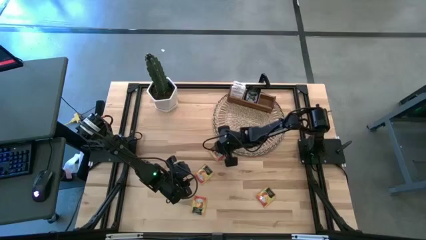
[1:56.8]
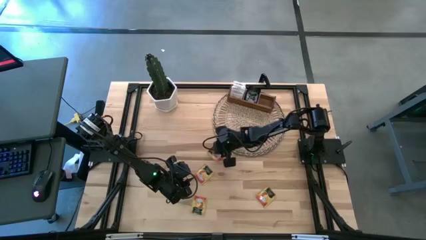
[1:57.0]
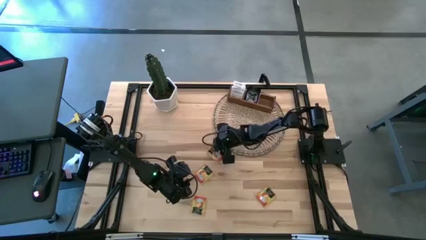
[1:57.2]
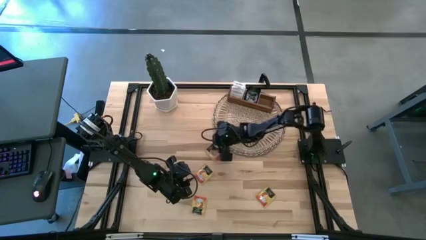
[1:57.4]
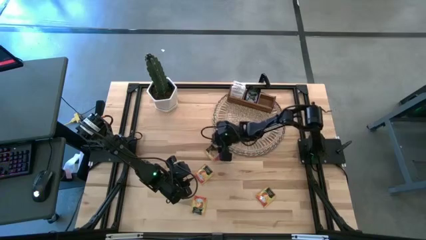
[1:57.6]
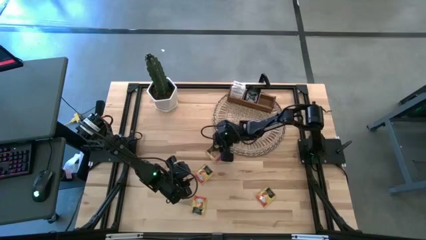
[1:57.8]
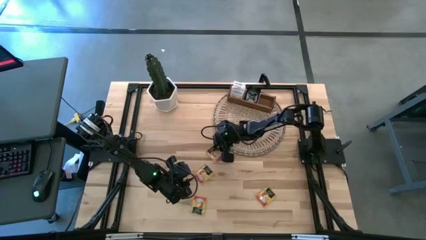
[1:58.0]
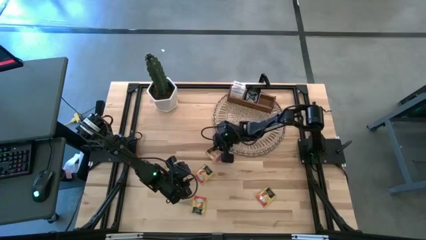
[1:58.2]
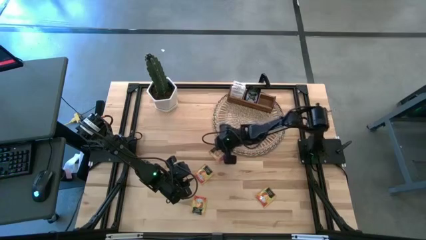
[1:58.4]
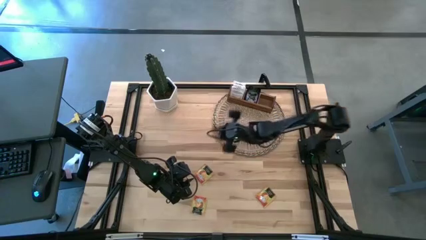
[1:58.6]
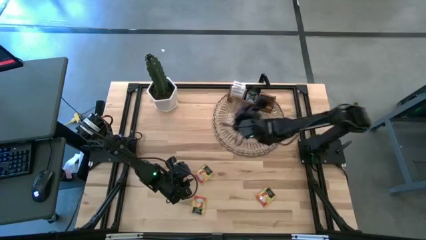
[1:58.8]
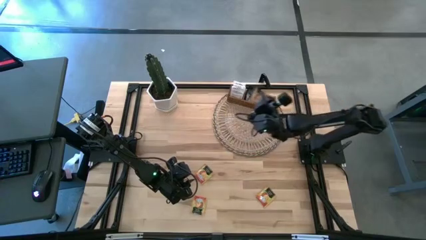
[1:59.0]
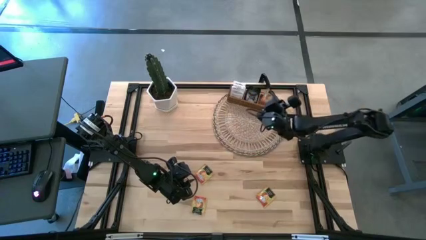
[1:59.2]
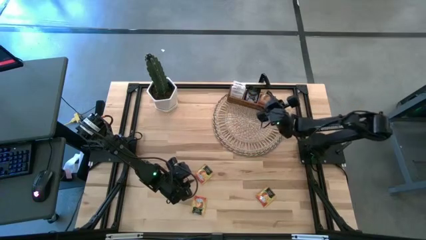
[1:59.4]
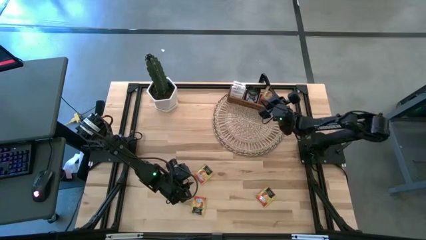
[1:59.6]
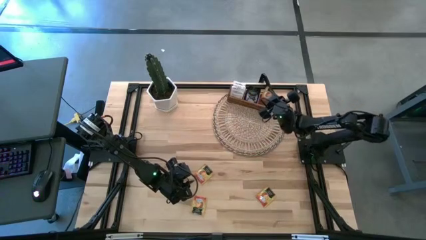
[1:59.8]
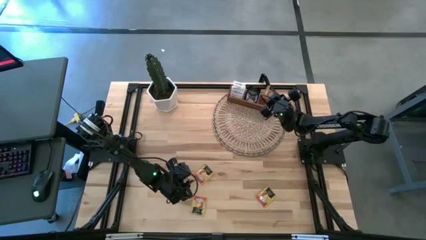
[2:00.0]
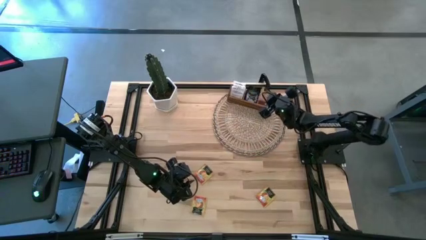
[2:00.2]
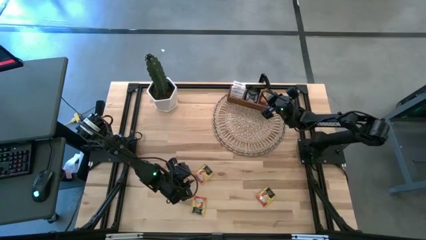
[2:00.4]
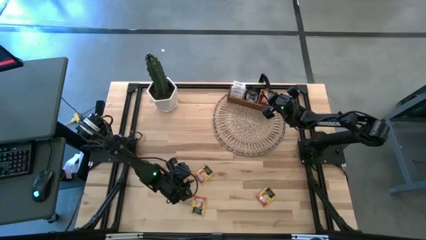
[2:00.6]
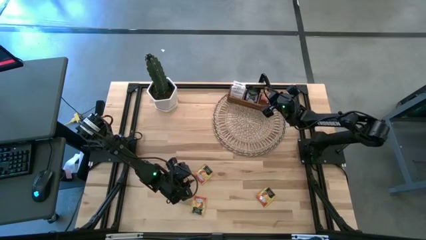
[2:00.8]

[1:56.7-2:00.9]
Task: Pick & Place Tea
Put the yellow tea bag into the right section of the wooden organizer

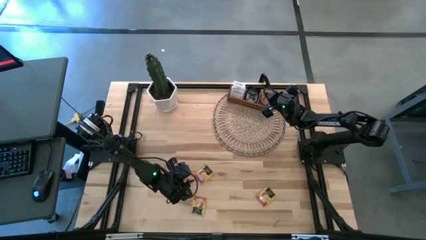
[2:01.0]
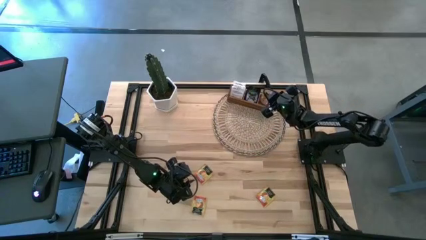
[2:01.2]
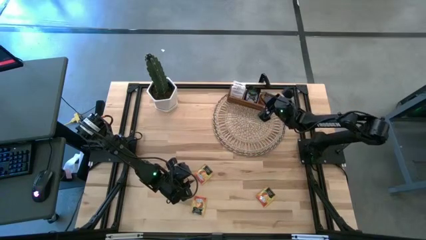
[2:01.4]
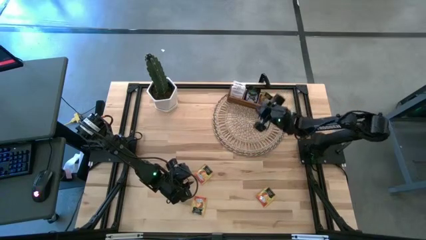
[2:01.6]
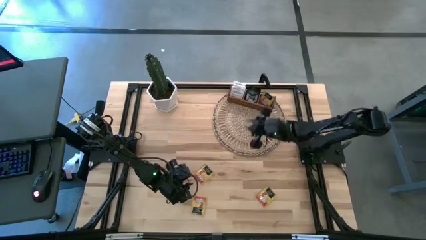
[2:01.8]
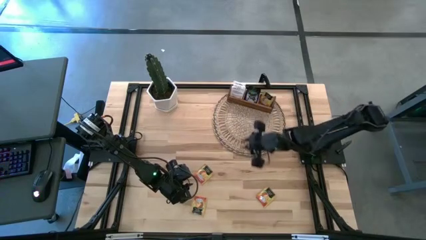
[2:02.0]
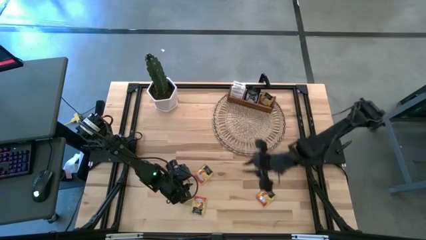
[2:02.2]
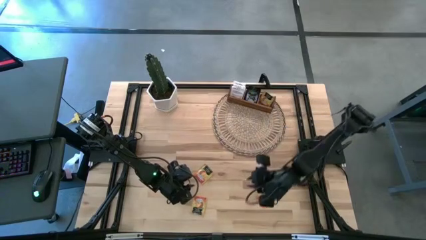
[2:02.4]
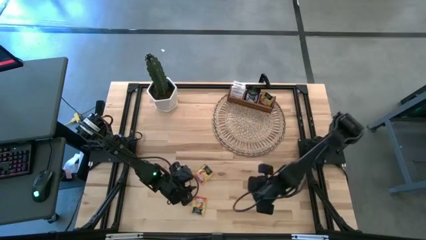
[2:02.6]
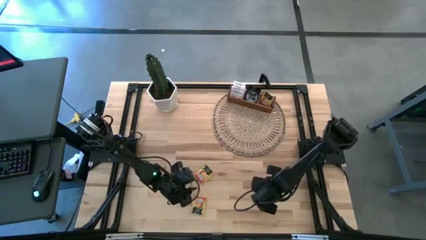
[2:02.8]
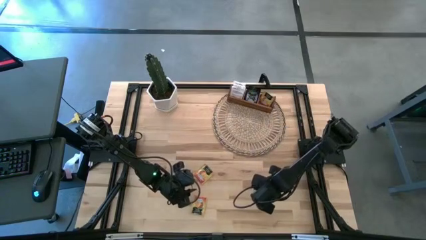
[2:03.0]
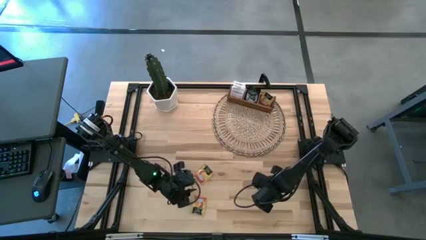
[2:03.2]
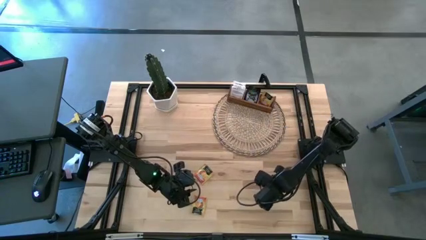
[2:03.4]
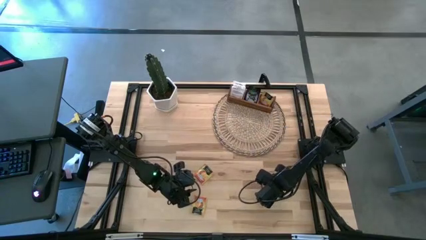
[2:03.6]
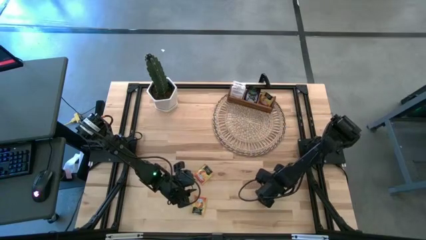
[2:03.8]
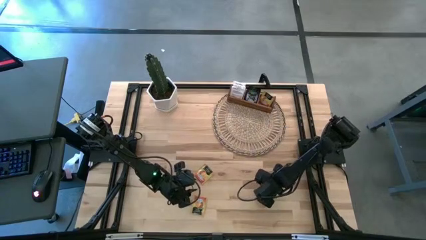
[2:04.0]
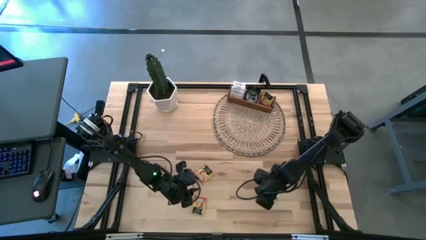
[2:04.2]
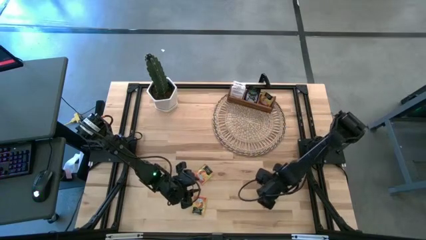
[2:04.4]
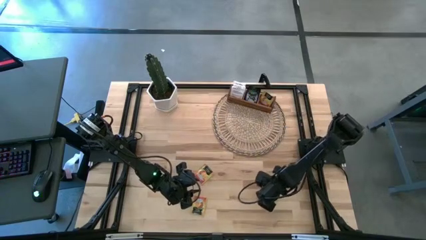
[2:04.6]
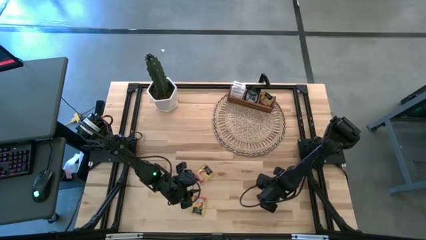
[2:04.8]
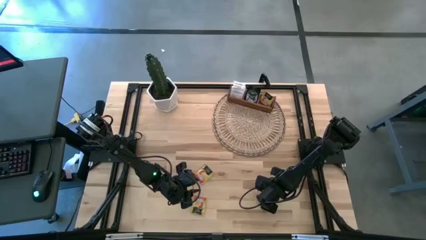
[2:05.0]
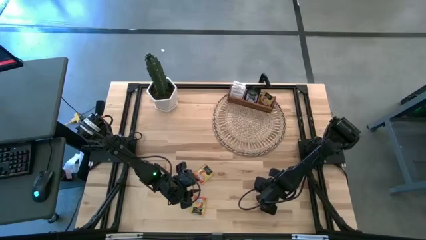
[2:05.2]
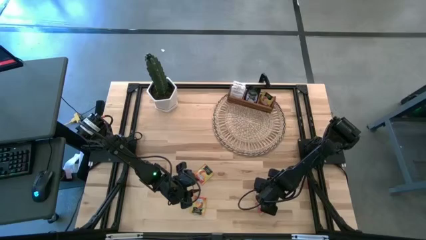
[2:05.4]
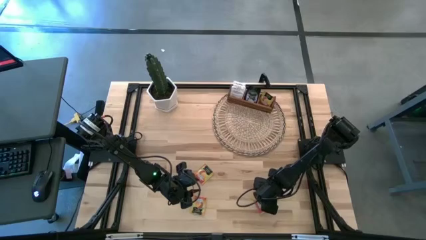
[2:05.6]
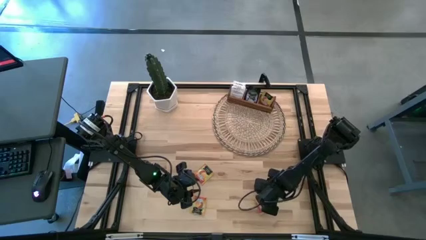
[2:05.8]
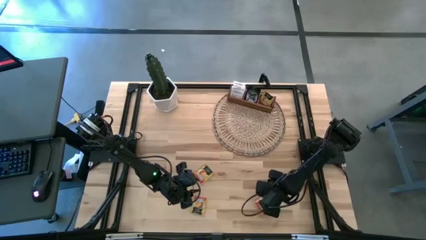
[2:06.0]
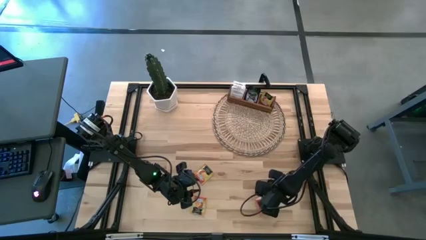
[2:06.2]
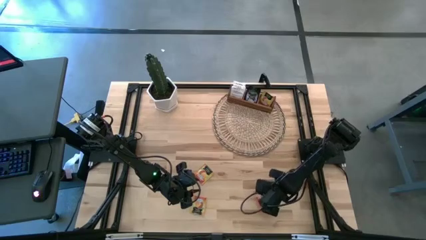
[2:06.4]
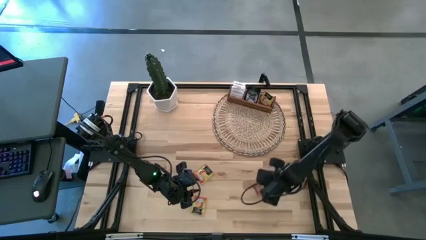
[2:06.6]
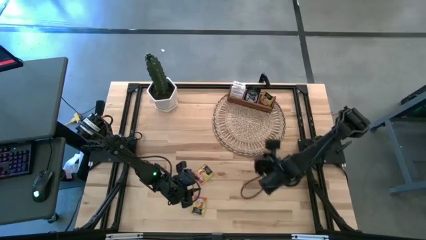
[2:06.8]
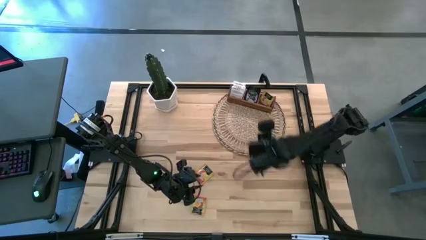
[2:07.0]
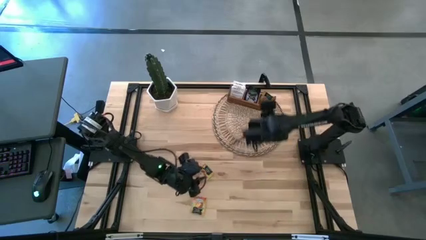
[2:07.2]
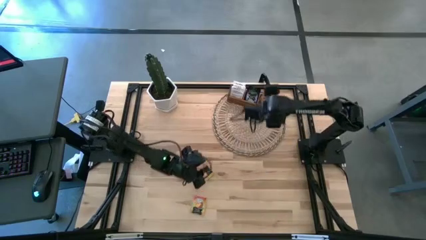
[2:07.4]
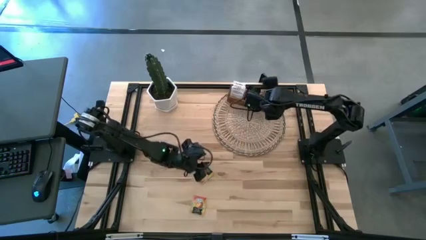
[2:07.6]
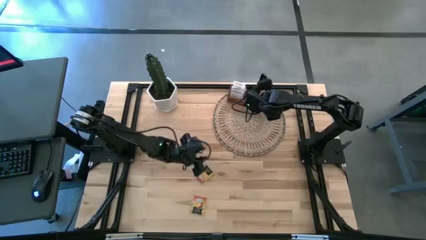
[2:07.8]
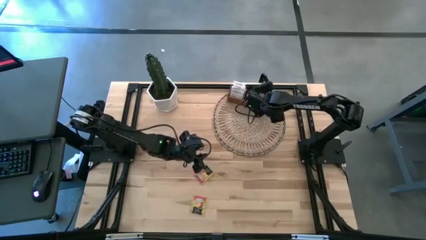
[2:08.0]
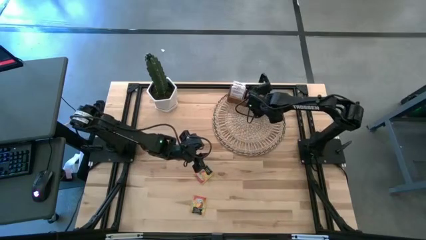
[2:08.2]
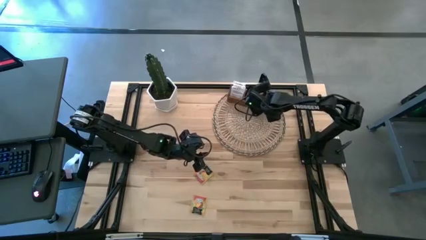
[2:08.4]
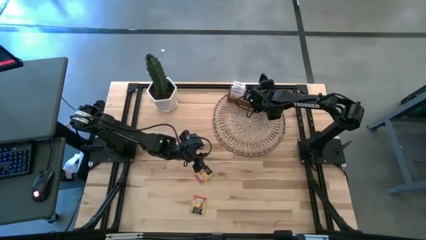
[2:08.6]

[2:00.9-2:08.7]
Put the yellow tea bag into the right section of the wooden organizer

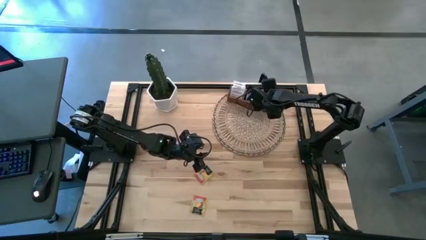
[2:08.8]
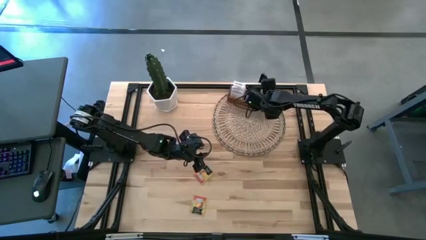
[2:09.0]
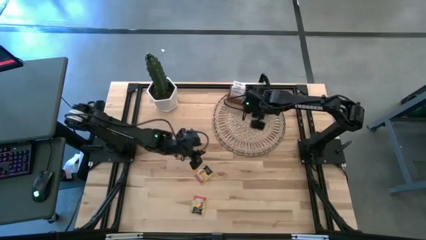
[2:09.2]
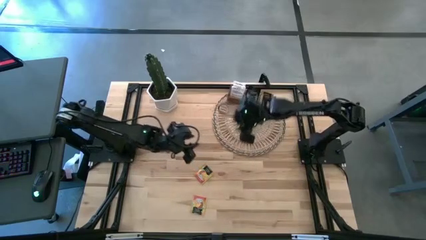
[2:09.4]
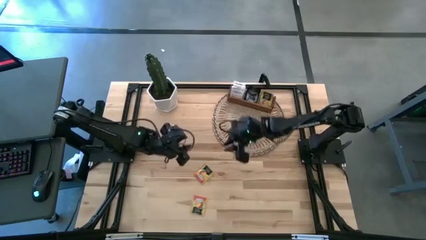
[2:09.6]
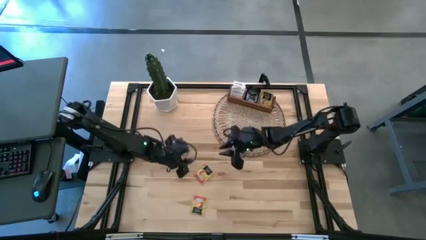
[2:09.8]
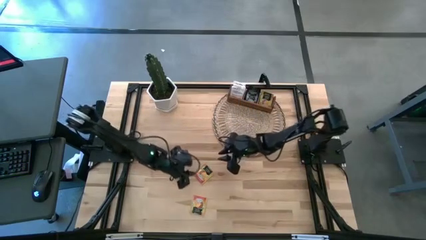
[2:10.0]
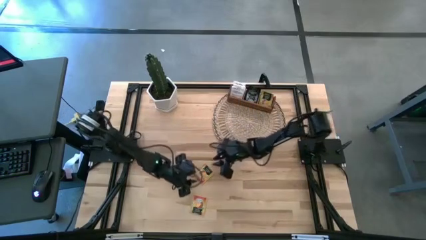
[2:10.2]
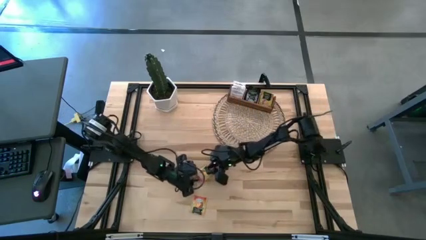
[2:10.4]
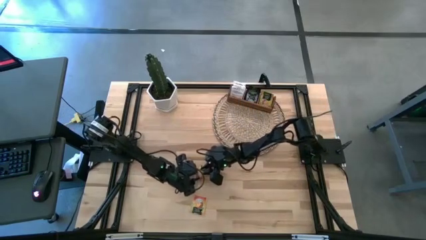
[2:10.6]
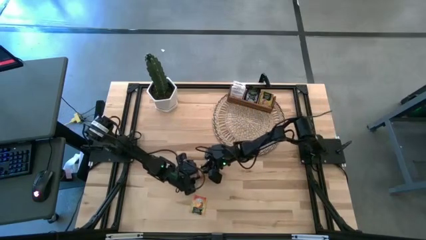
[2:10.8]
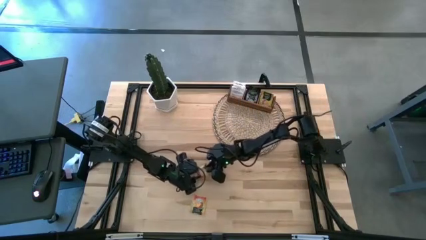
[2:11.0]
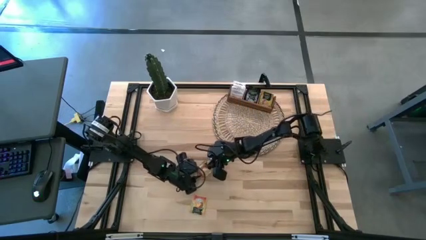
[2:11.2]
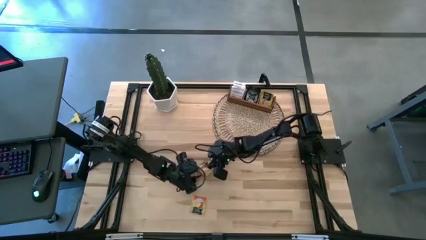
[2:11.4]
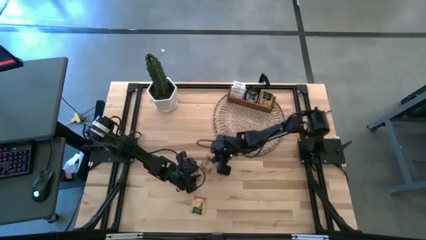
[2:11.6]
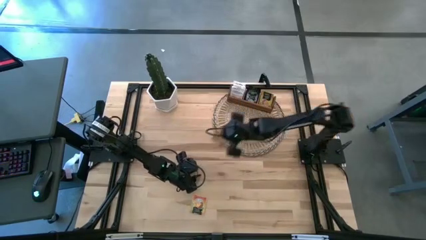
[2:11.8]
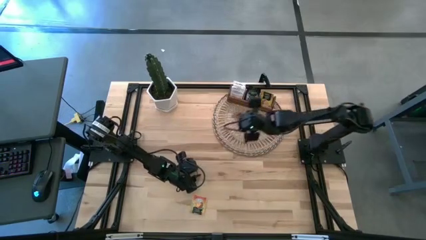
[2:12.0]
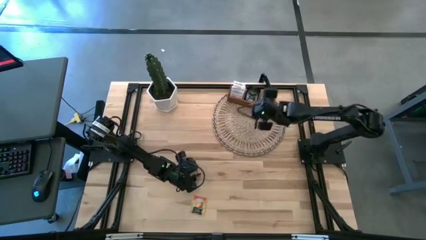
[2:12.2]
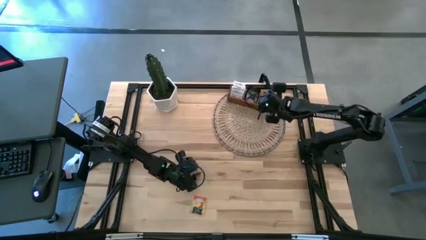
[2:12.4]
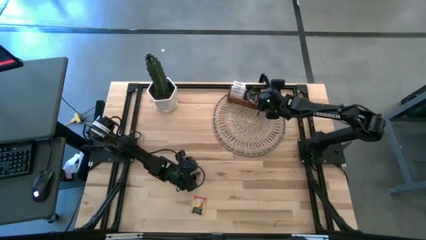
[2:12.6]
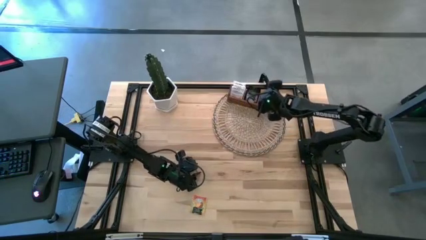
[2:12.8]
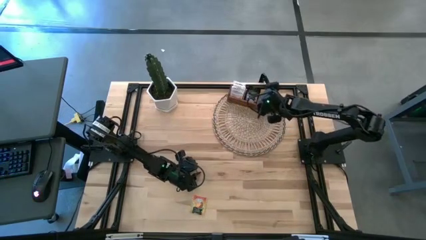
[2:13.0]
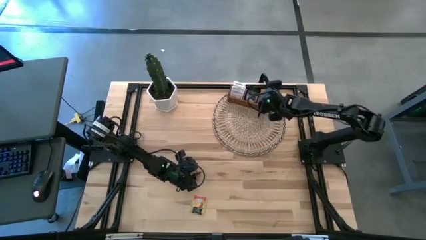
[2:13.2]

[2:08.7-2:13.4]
Put the yellow tea bag into the right section of the wooden organizer
